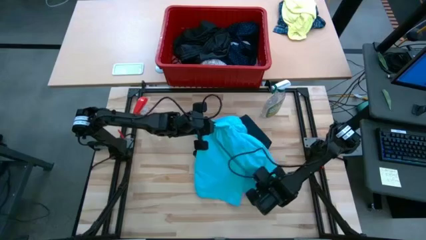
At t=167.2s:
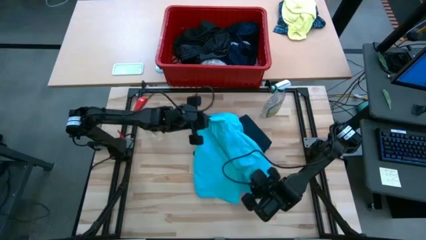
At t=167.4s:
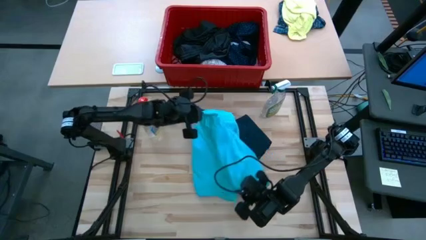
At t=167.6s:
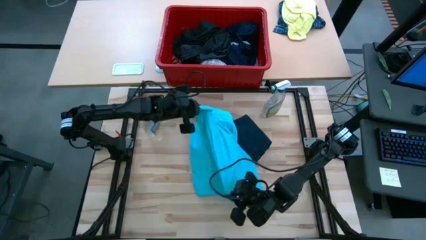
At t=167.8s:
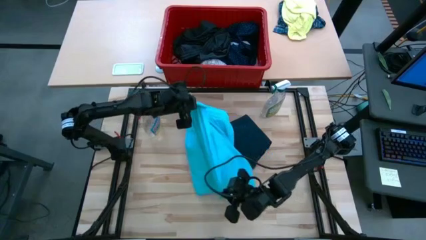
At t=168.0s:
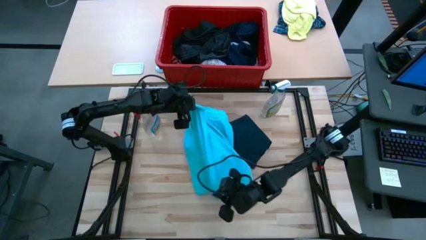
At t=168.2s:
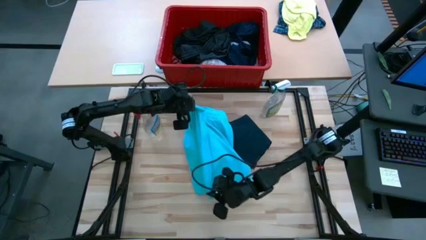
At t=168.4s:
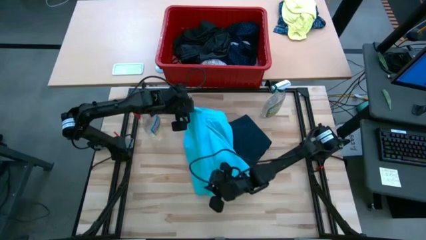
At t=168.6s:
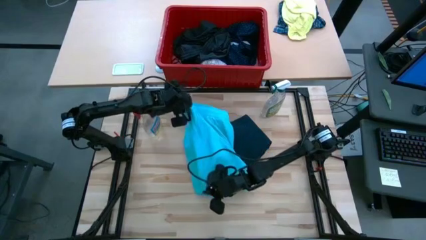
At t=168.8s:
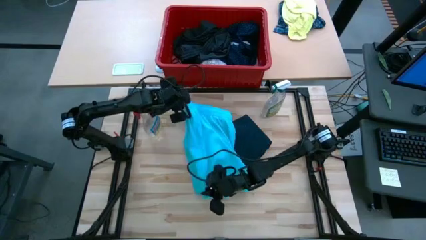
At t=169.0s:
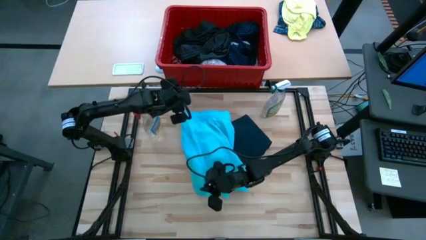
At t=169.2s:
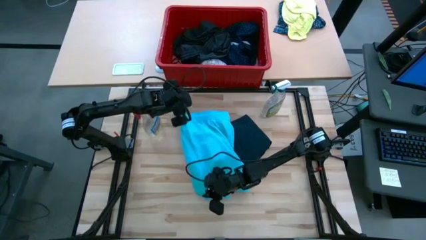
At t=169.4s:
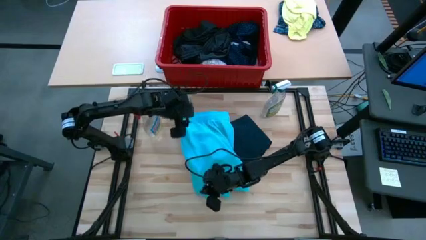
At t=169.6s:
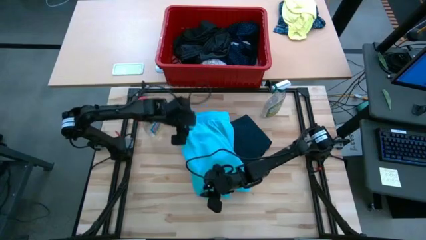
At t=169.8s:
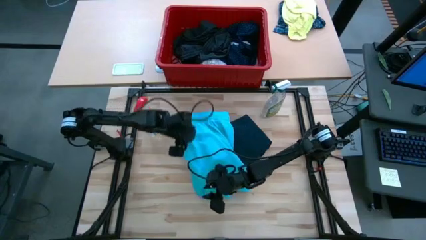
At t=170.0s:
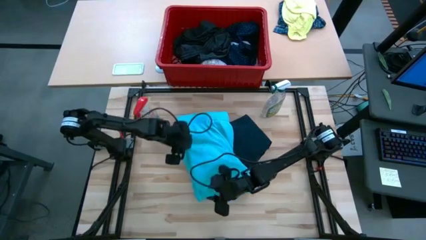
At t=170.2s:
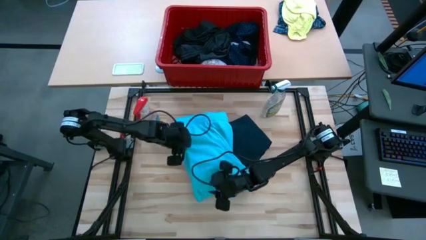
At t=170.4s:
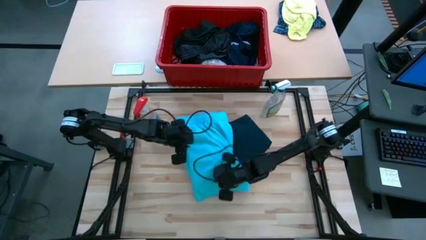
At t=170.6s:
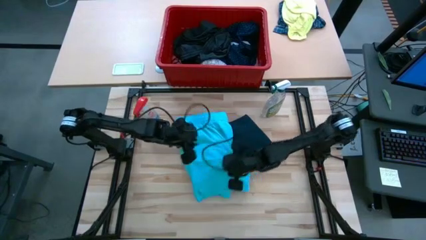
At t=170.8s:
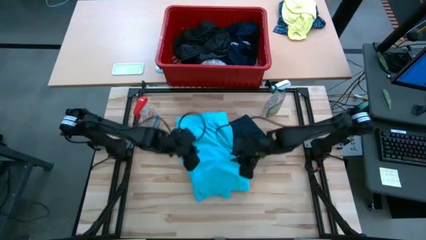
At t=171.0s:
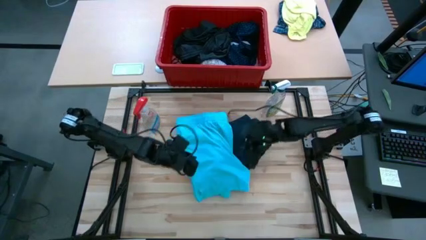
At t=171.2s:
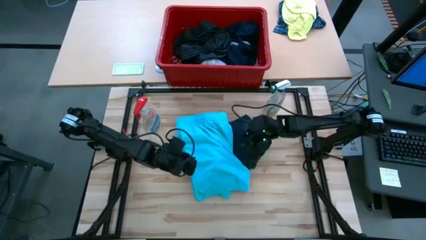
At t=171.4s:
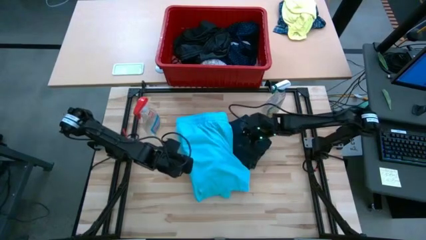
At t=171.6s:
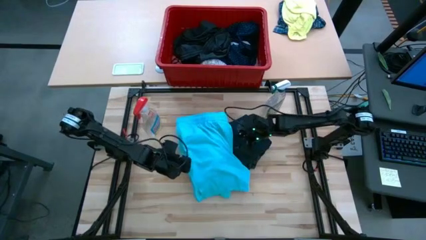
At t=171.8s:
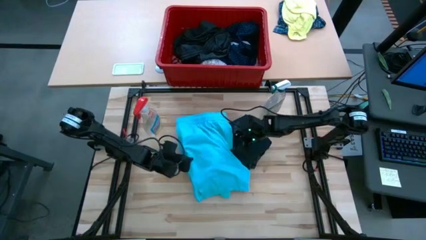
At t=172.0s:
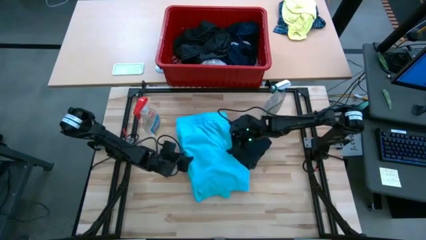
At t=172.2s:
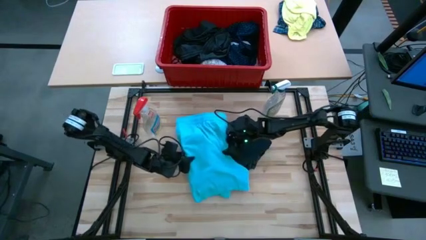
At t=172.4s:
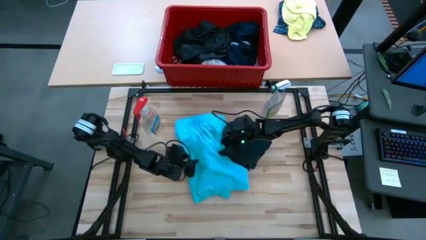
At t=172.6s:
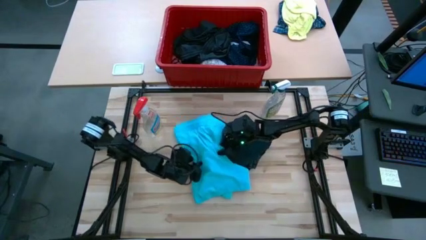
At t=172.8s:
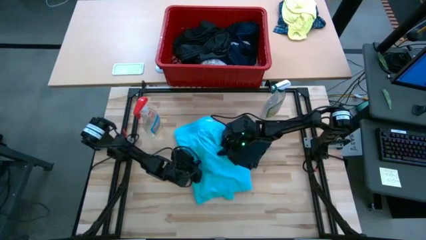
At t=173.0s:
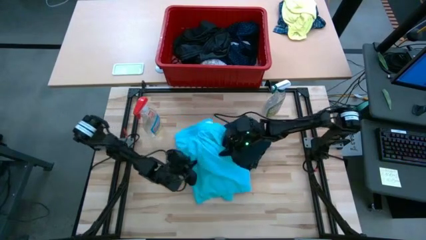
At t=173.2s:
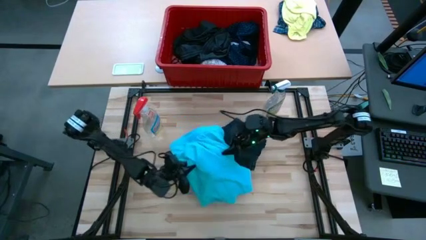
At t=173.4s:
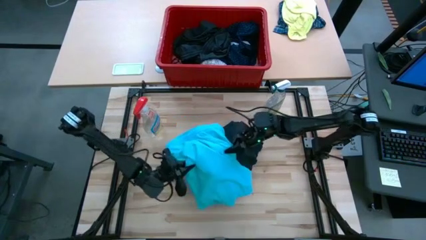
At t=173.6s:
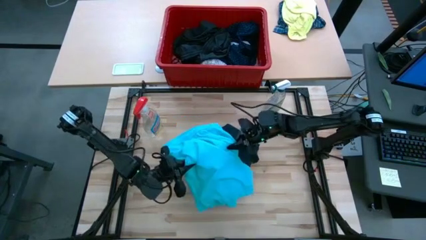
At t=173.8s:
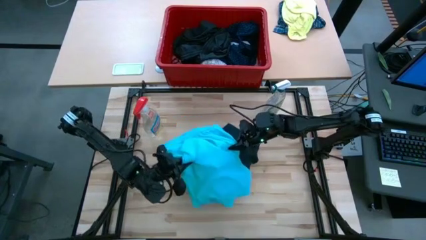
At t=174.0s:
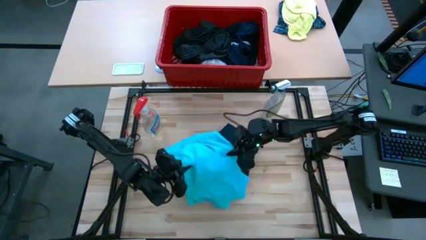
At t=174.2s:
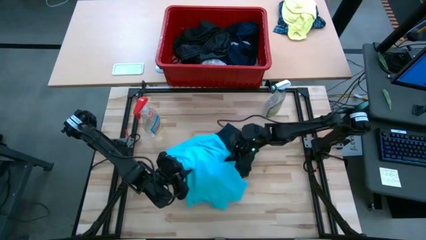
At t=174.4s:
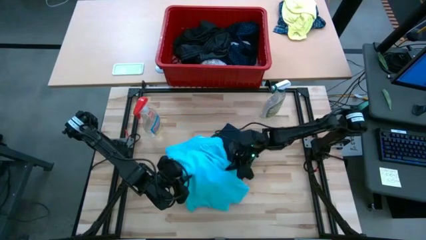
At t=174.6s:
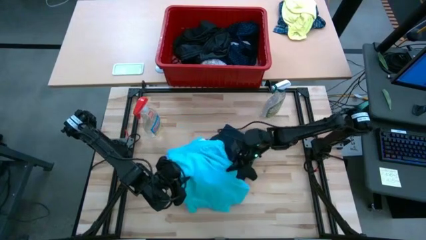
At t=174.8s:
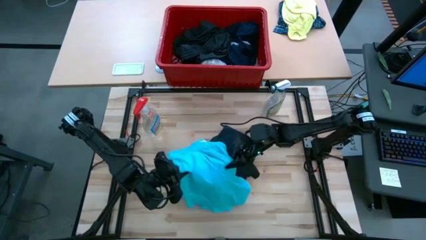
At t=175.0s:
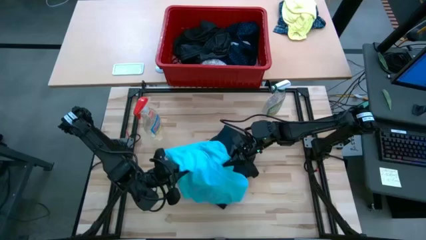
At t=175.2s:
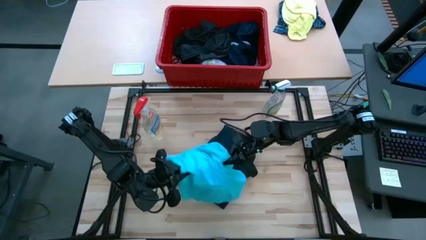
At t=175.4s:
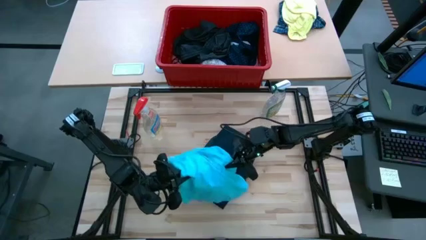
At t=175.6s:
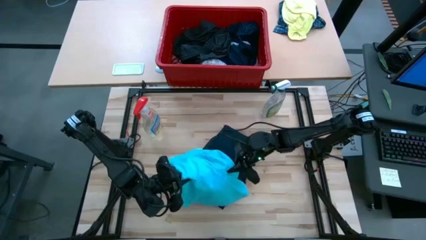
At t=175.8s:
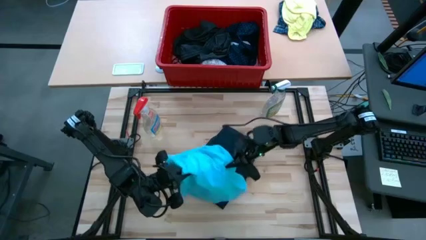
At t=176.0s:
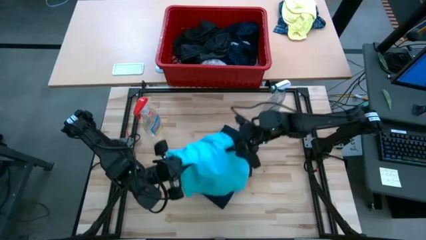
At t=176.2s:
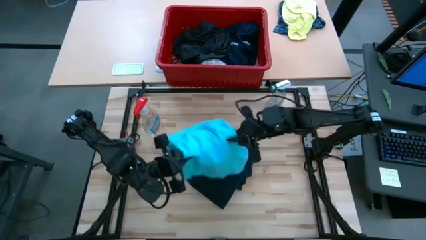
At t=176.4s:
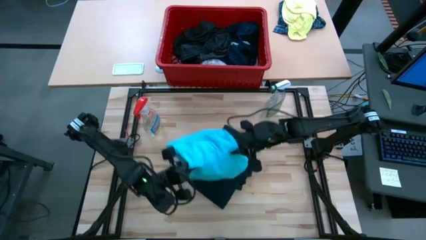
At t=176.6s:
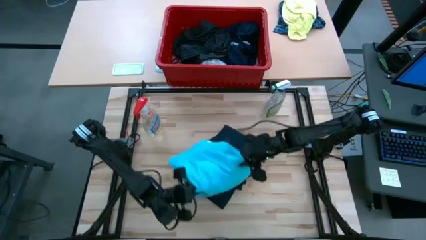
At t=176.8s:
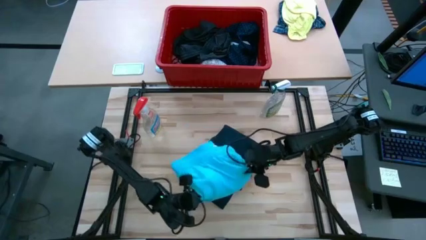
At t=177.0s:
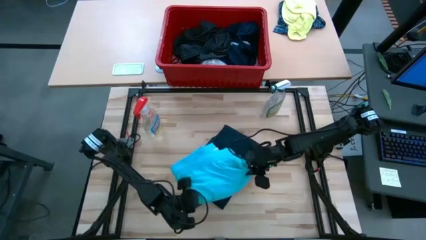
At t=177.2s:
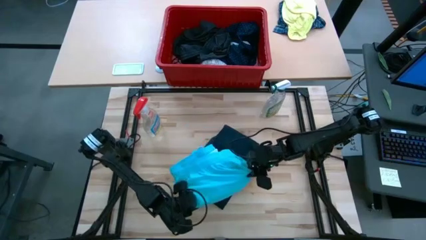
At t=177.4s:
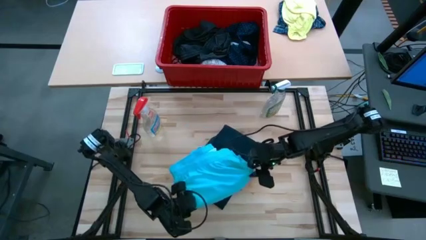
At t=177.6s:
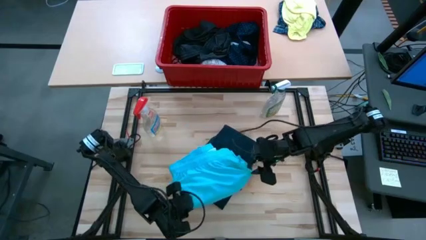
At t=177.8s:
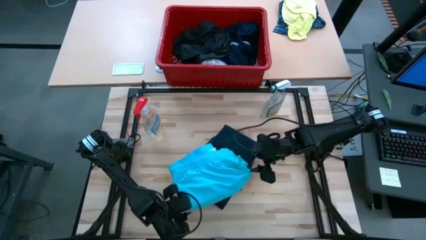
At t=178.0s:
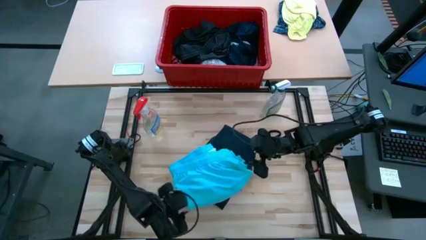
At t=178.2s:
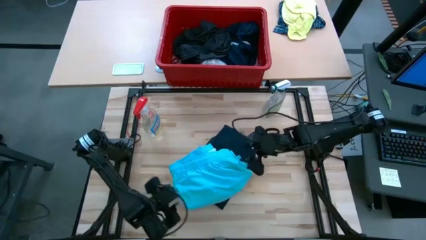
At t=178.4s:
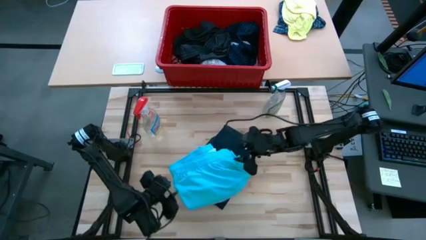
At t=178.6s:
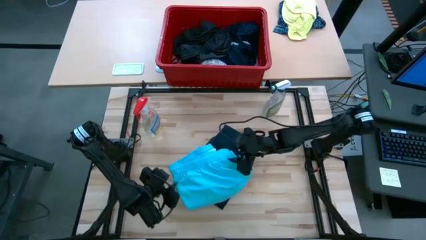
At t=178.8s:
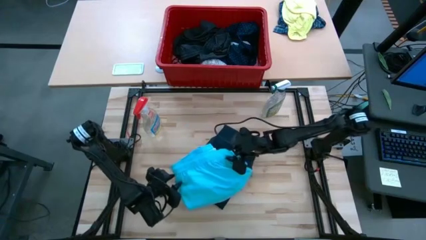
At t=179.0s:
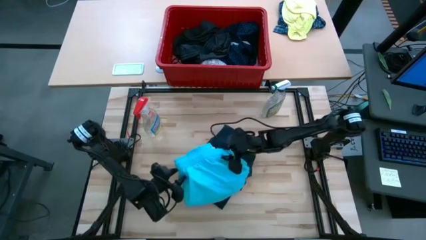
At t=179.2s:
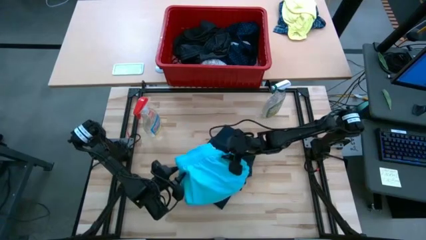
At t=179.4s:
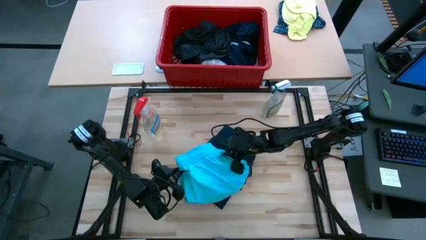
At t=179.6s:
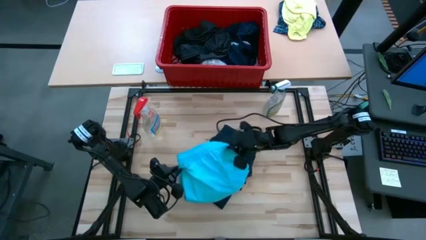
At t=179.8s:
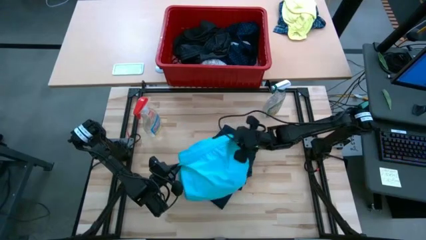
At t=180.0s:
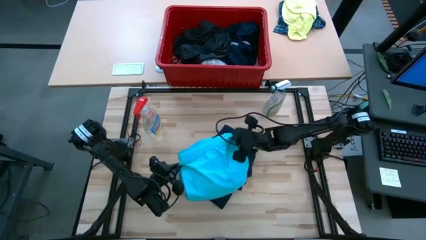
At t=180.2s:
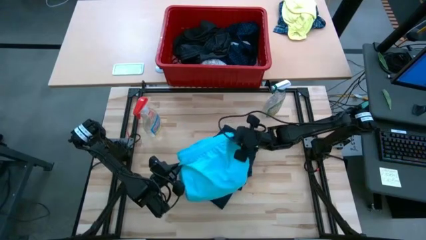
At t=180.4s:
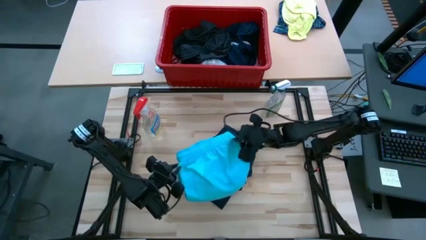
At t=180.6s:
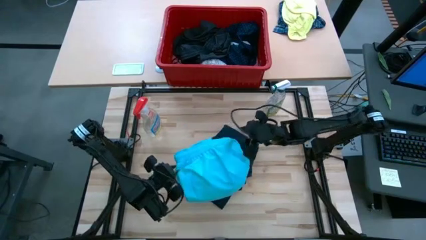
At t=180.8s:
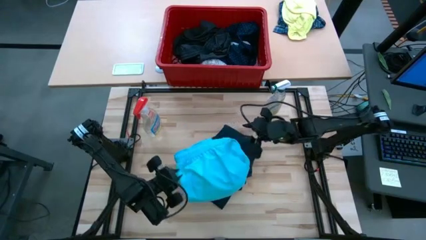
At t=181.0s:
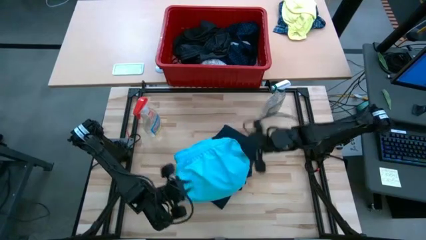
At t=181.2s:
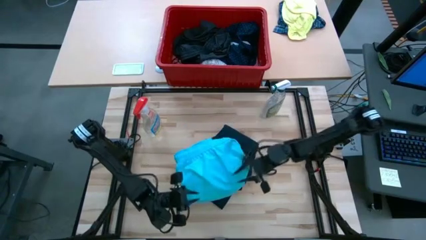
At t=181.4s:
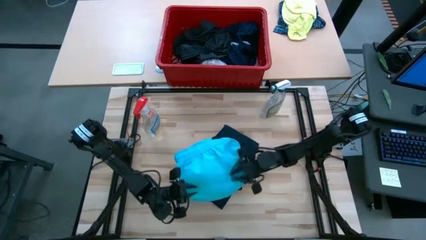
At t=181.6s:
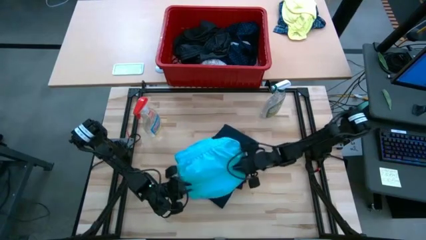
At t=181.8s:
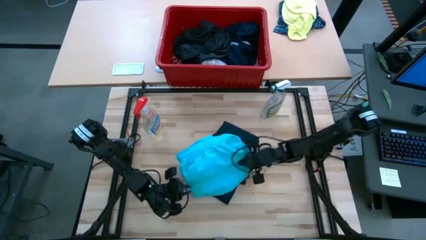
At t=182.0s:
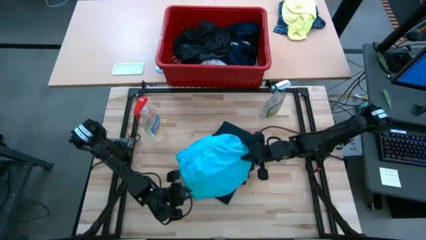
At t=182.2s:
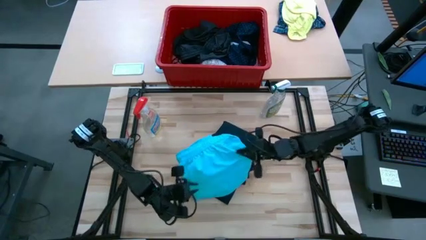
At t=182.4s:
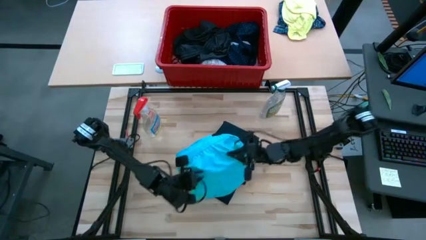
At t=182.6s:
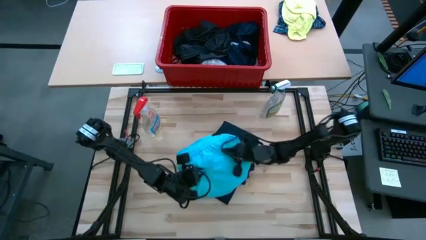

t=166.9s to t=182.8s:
Task: Fold Laundry from Bin
Fold the light blue shorts
